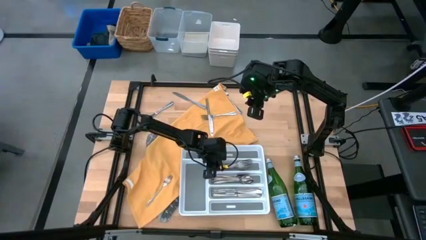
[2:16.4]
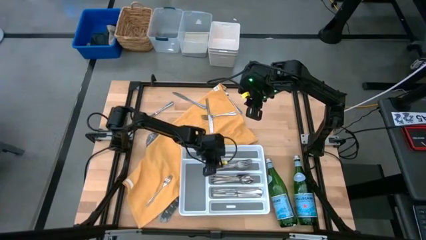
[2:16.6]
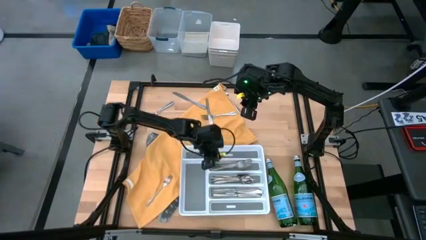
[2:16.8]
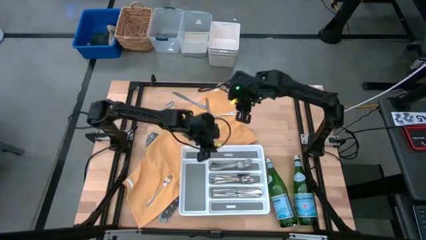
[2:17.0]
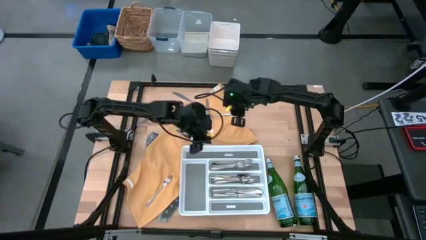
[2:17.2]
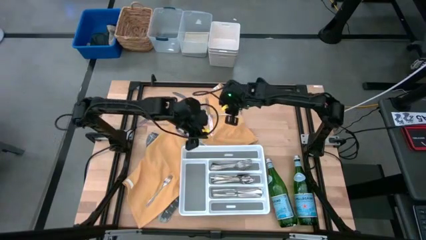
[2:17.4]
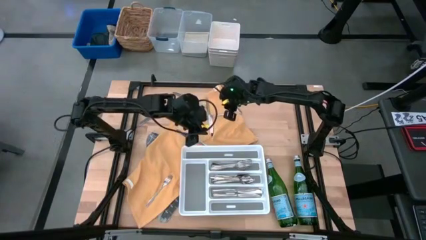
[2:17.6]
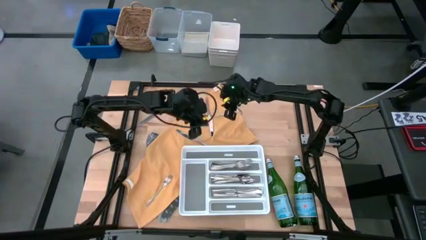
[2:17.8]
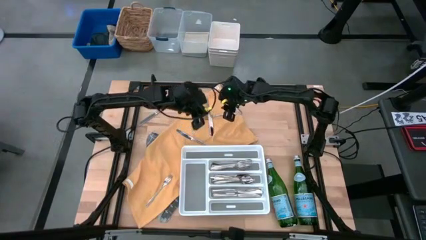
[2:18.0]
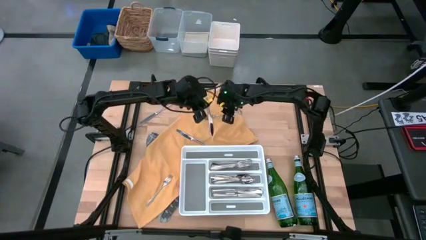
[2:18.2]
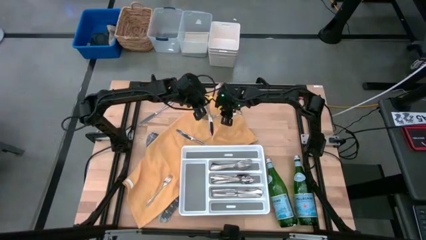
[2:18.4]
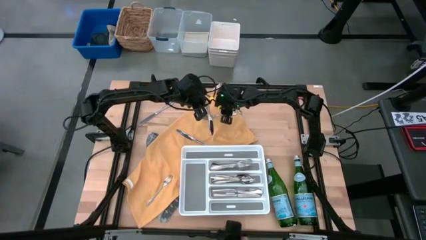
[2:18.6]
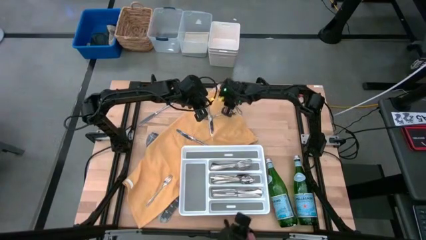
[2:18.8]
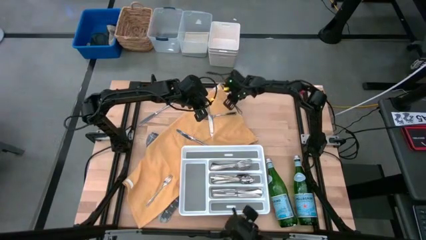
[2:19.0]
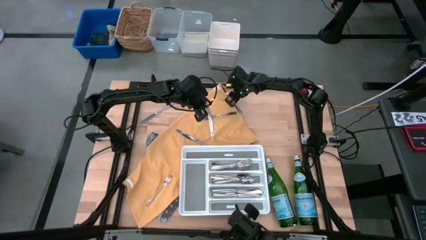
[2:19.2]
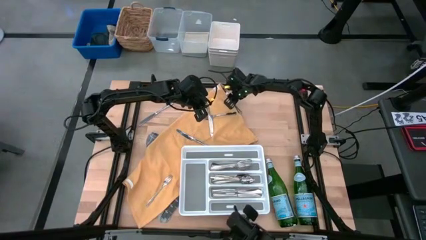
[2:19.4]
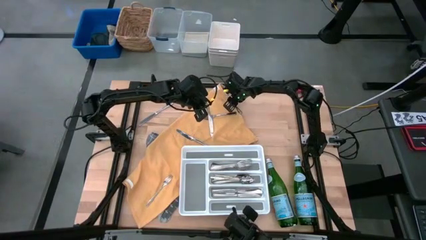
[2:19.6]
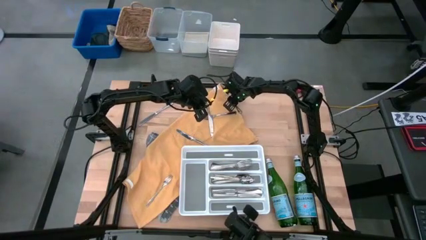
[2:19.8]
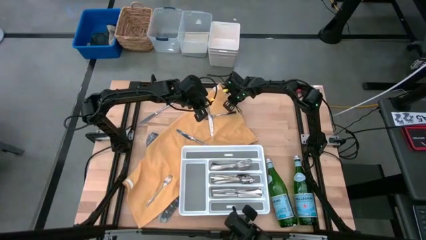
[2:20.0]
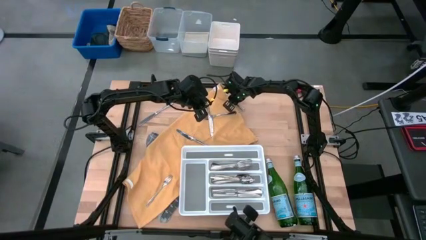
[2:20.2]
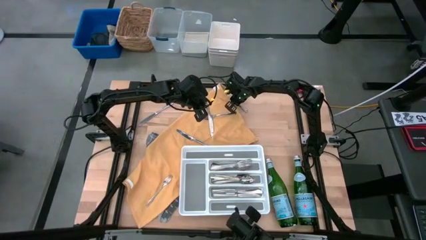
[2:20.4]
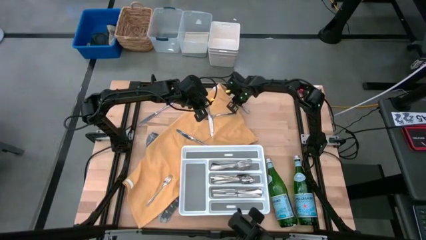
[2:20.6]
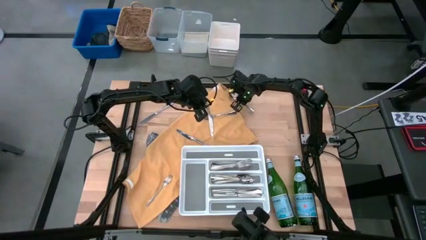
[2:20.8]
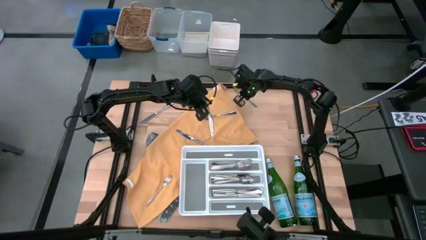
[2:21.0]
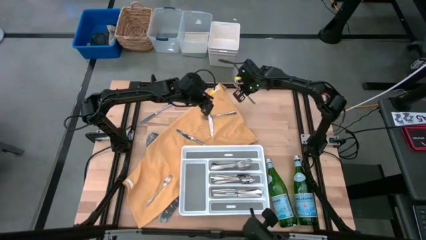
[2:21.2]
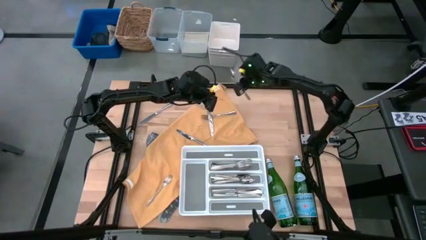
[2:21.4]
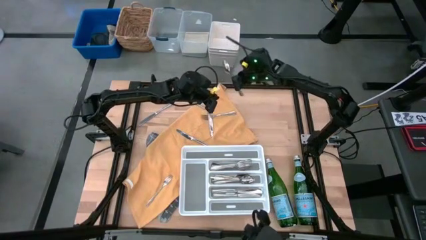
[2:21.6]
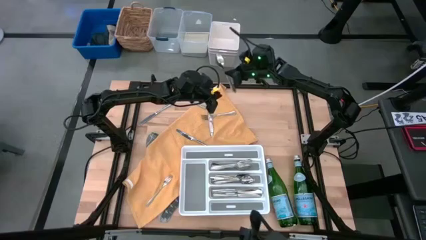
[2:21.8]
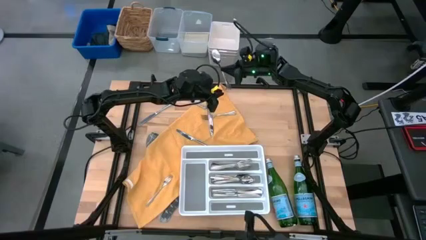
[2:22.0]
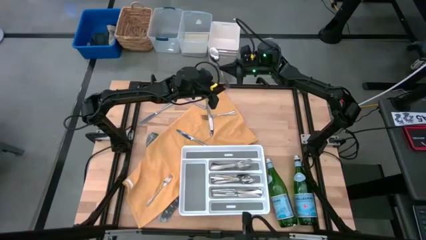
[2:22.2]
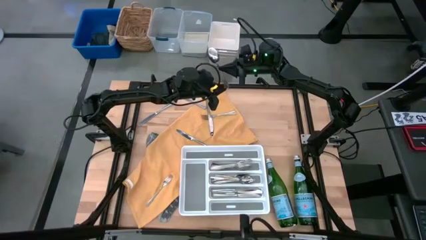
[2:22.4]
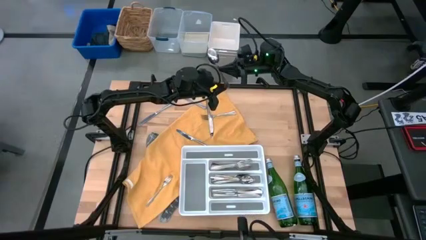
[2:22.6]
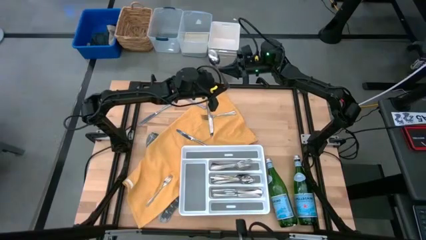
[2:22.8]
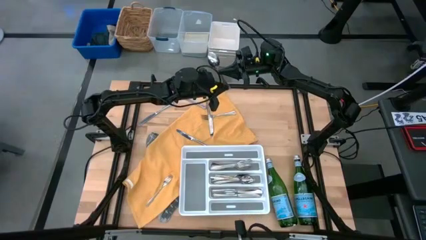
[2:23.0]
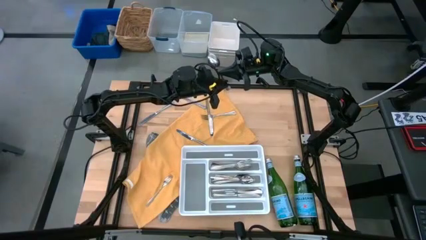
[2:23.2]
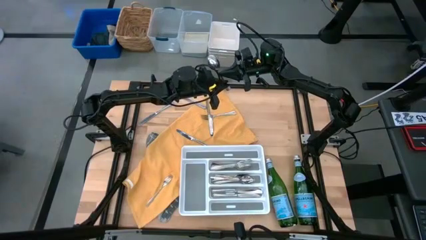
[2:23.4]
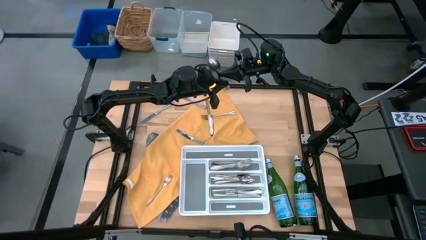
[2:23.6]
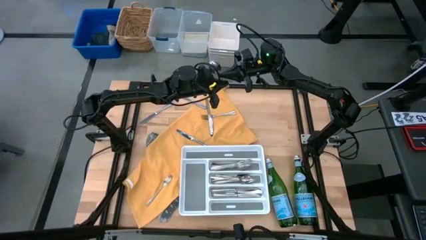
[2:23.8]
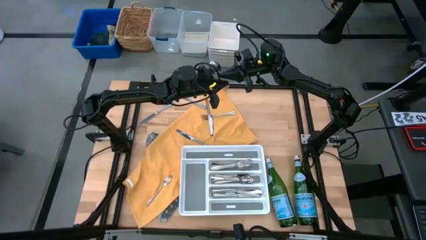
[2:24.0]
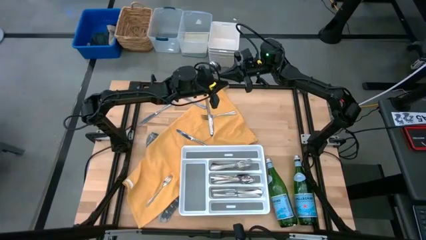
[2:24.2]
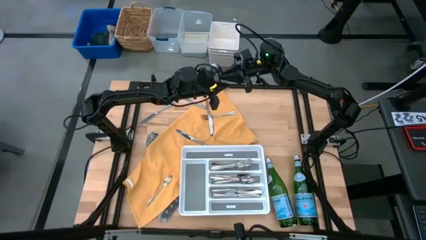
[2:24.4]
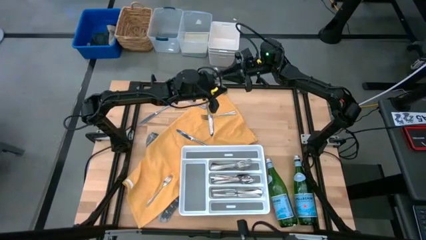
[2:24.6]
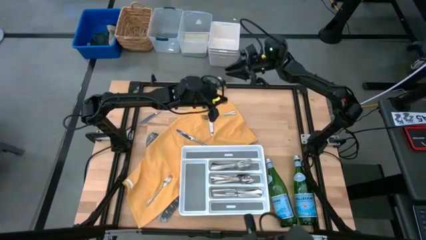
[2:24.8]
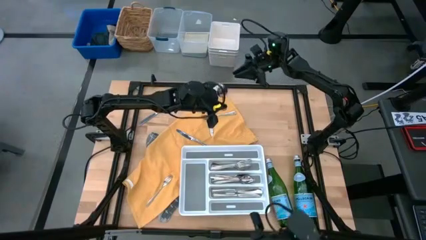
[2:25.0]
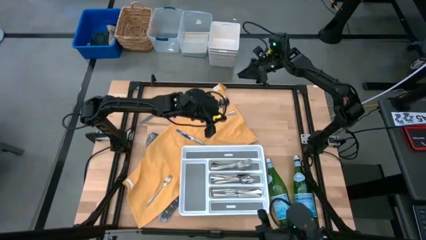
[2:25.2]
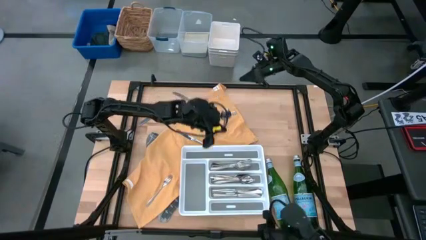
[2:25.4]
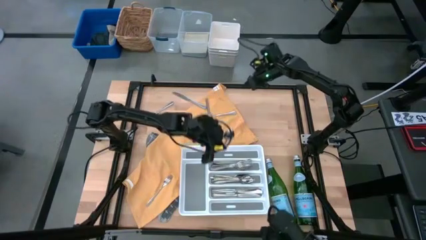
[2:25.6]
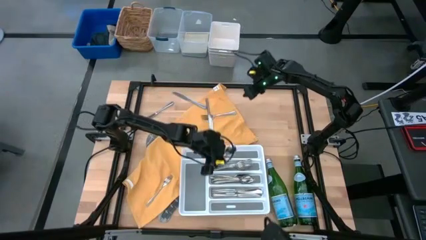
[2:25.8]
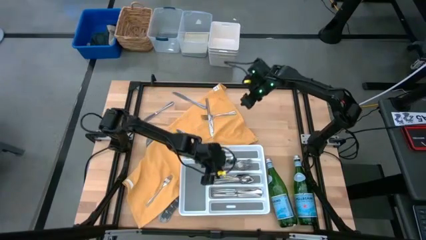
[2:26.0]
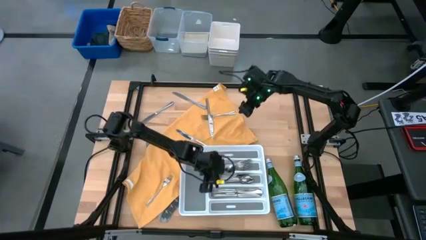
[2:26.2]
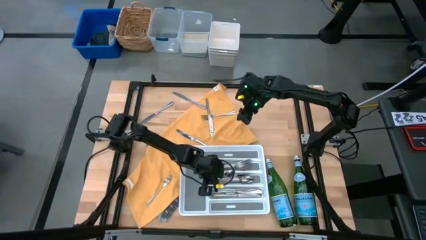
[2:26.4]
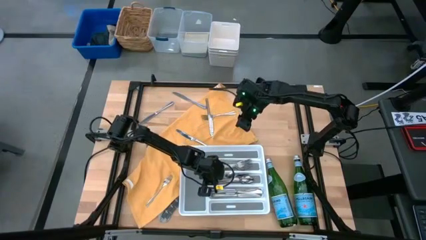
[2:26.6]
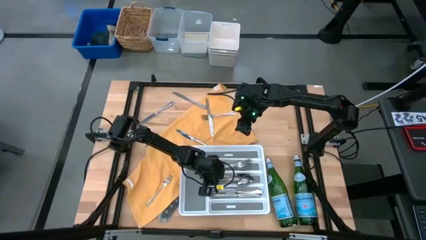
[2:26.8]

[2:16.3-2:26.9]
Task: Sort silverware
Put the silver spoon into the white silverware tray

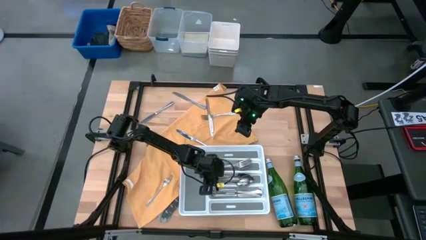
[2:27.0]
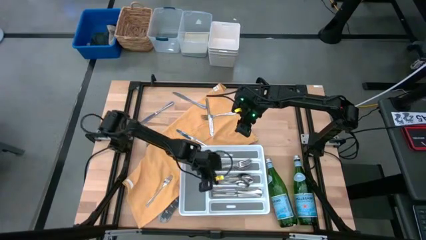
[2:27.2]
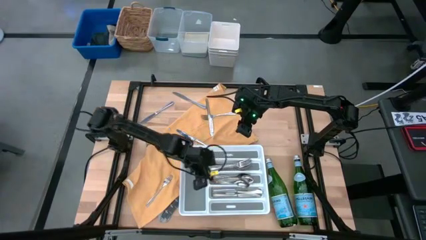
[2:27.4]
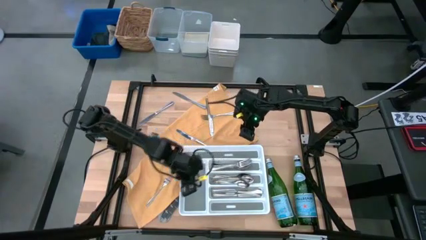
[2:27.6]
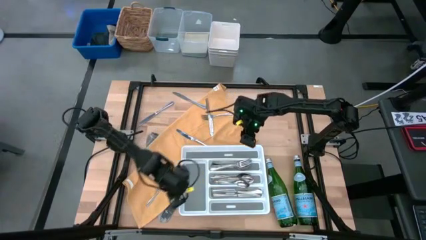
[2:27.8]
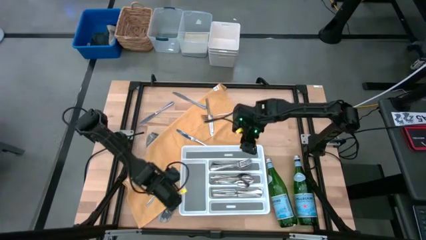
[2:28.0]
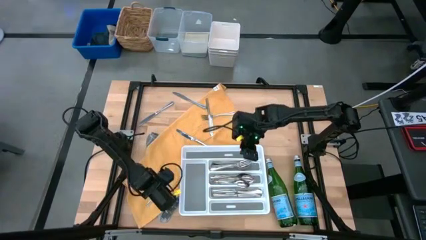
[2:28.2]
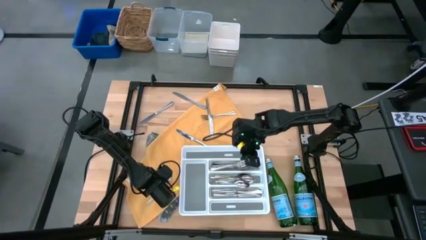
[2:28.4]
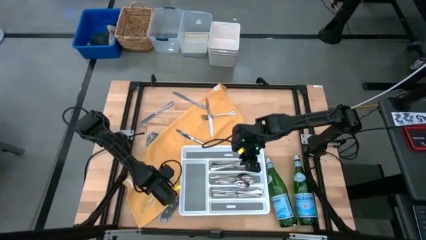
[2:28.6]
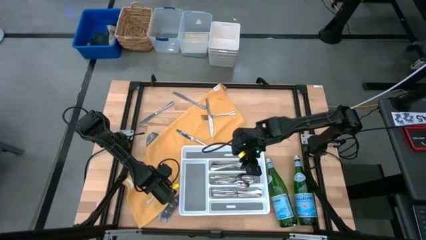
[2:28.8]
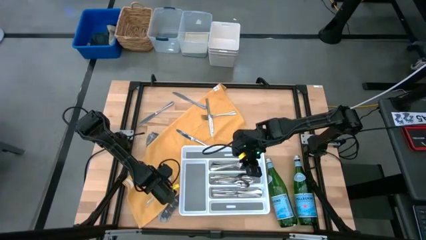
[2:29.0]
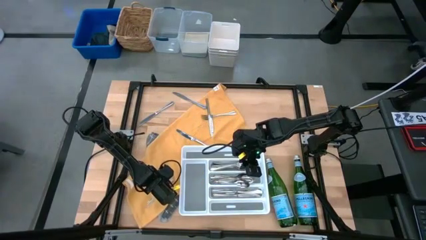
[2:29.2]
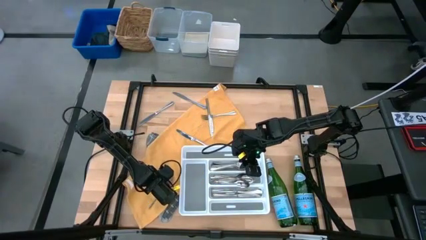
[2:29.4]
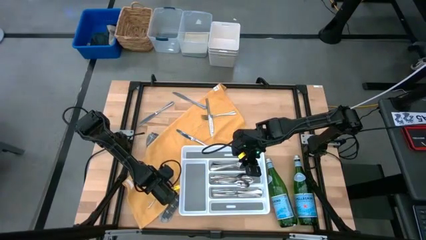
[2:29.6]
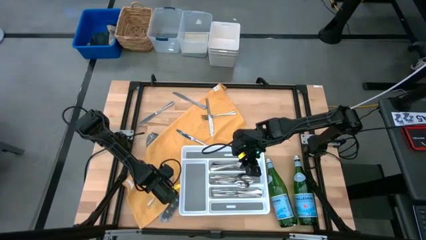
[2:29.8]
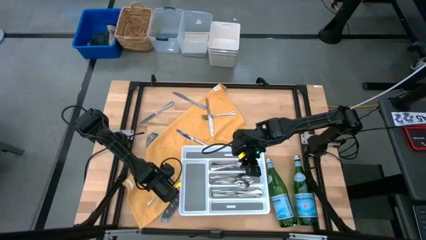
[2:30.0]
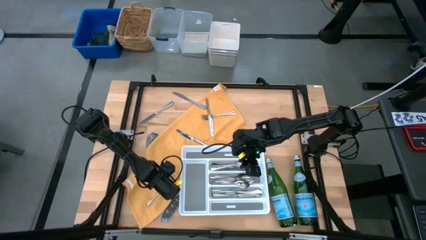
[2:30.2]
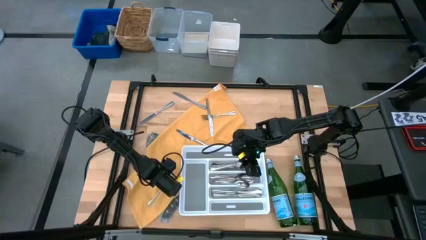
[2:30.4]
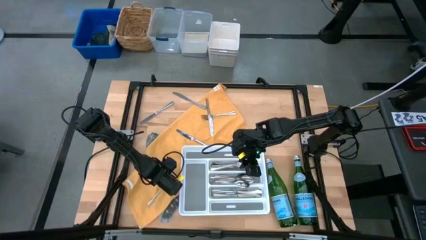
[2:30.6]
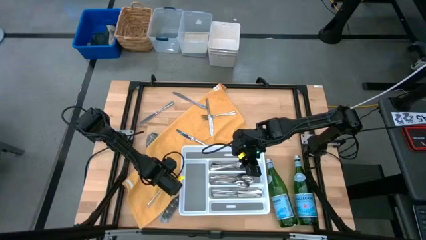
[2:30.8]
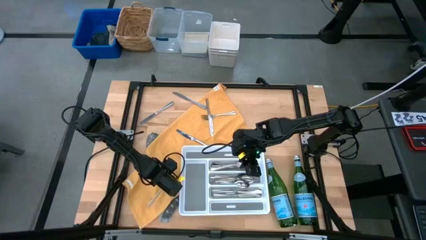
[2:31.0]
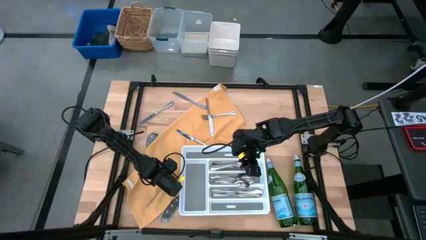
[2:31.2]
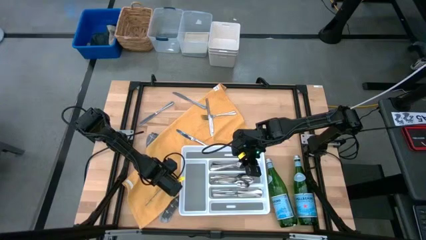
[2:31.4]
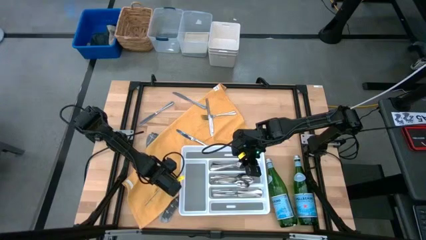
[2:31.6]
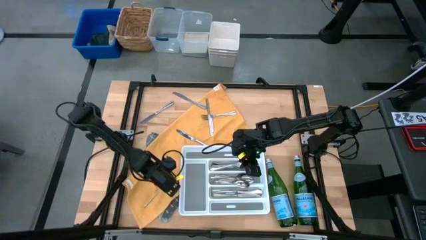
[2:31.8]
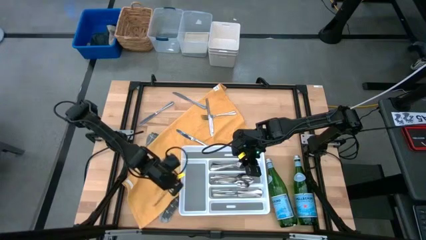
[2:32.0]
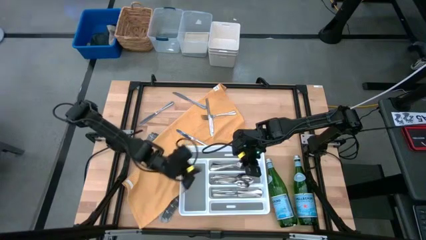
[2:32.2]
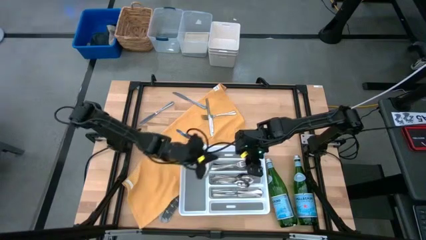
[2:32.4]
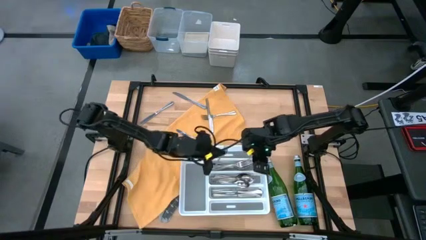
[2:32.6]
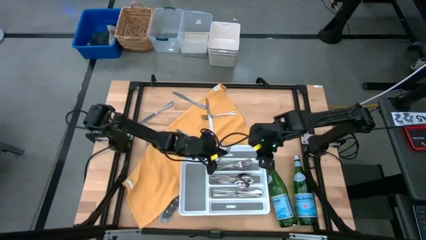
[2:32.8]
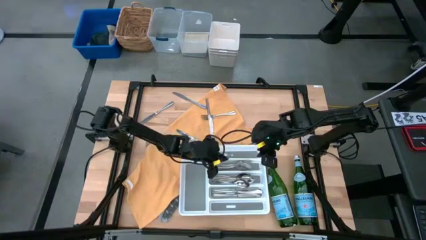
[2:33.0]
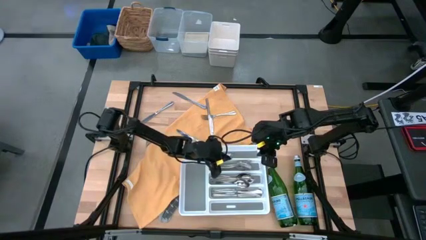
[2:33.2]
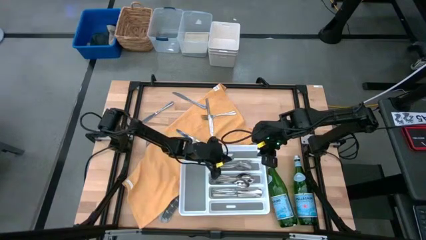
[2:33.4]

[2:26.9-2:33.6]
Put the silver fork into the white silverware tray
